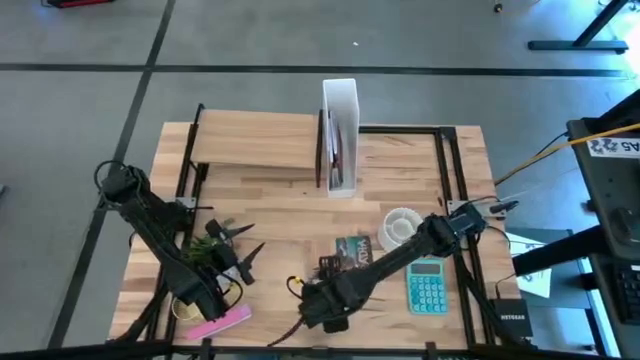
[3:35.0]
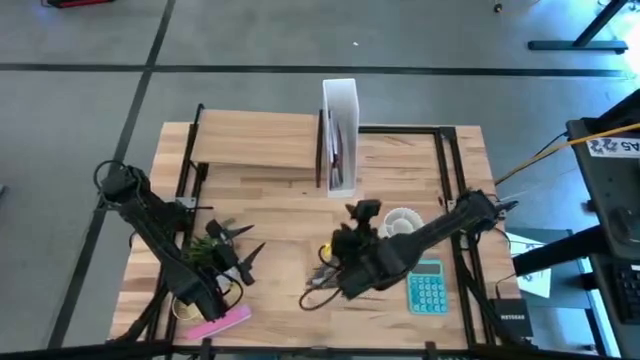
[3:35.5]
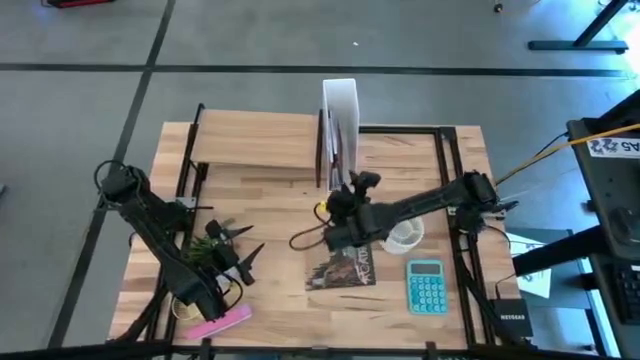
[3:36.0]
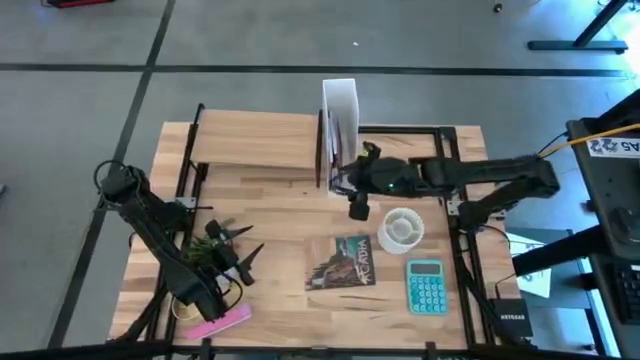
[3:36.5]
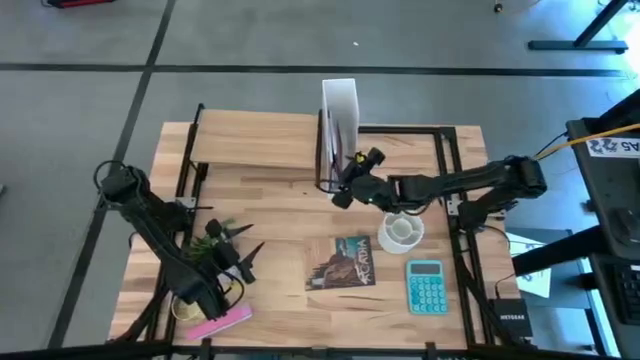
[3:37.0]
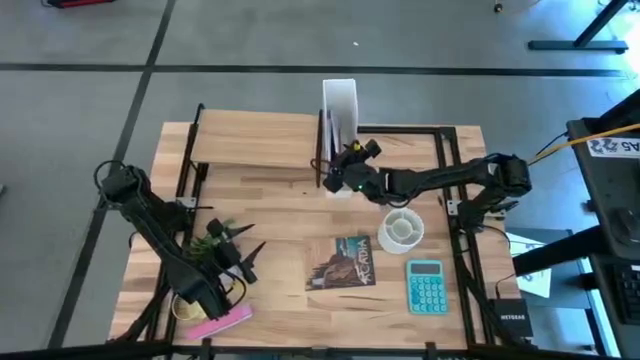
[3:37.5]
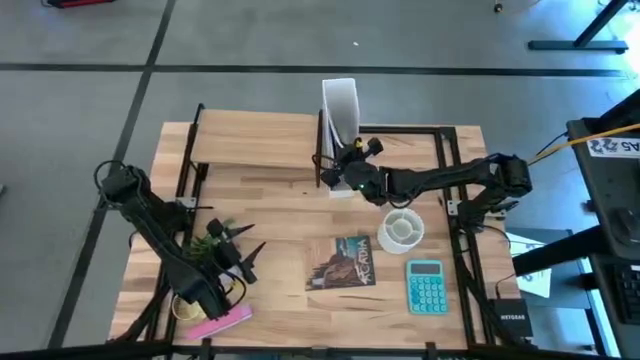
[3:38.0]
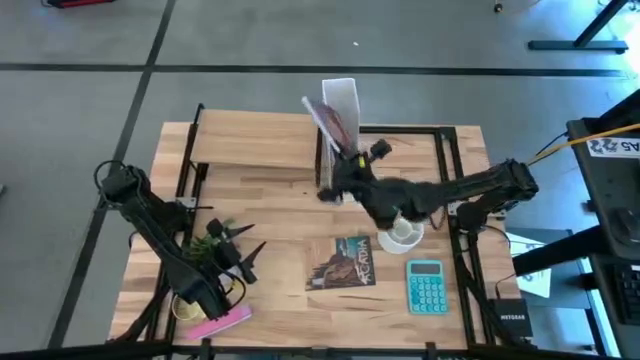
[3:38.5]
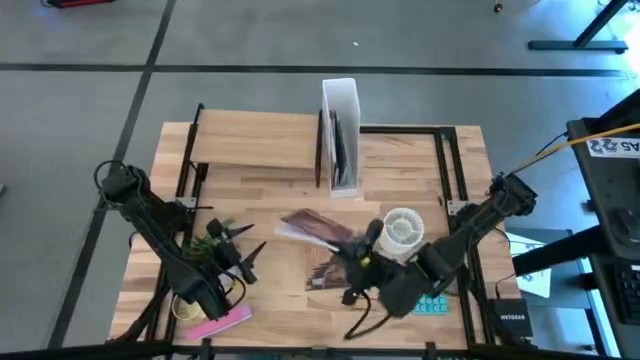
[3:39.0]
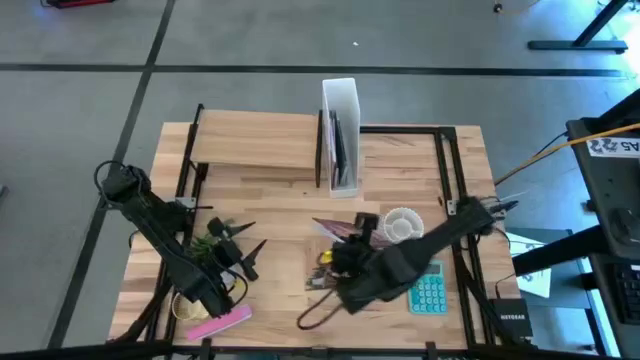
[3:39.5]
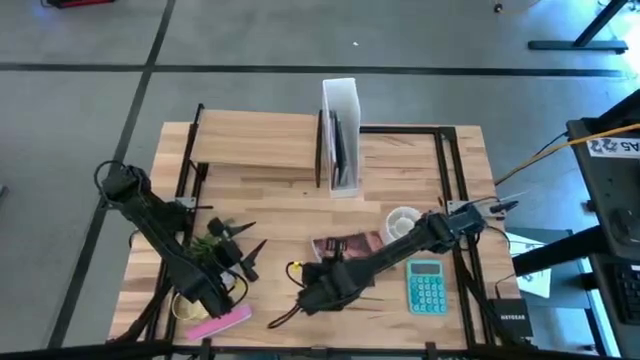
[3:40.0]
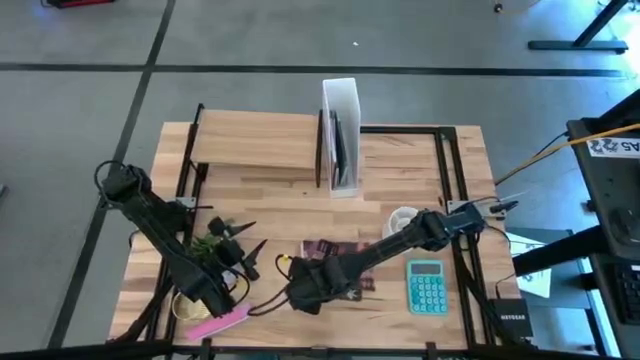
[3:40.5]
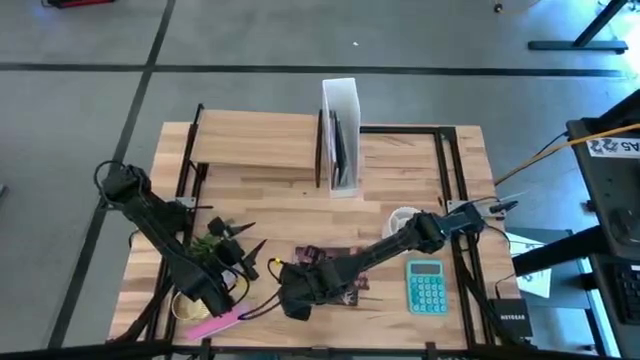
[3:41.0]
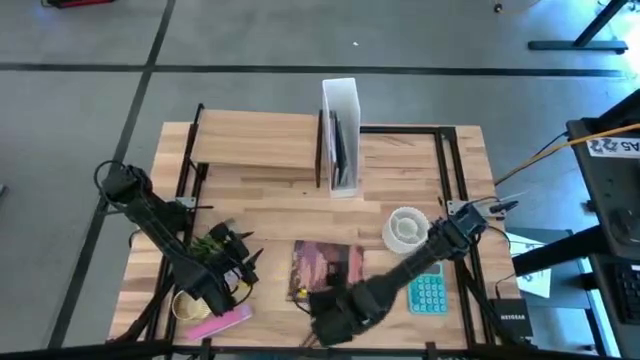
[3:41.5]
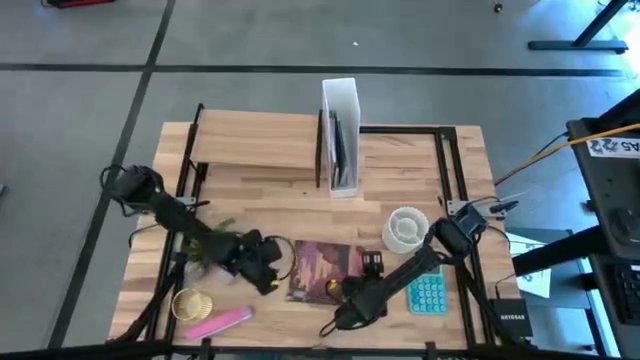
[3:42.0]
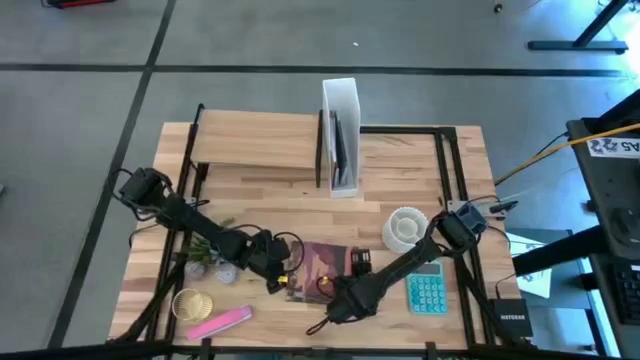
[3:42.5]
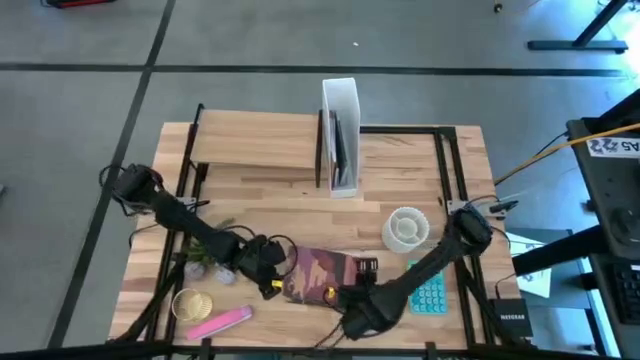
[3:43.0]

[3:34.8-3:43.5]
Task: Stock shelves
Remove the purple book from the white bookshelf

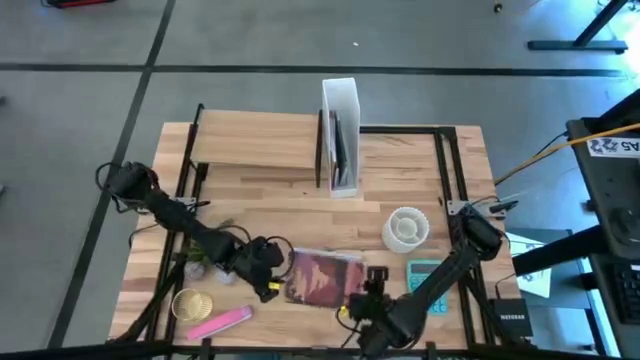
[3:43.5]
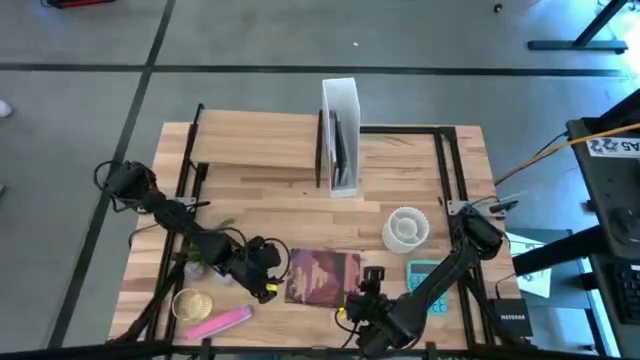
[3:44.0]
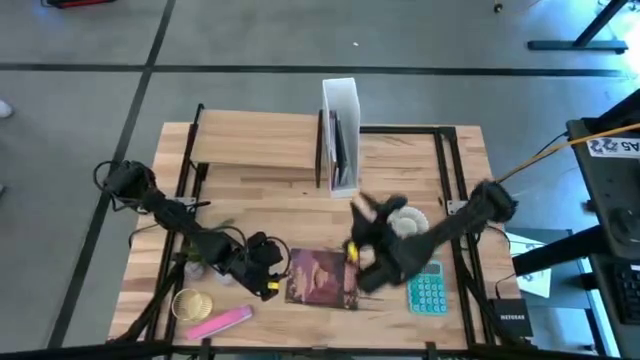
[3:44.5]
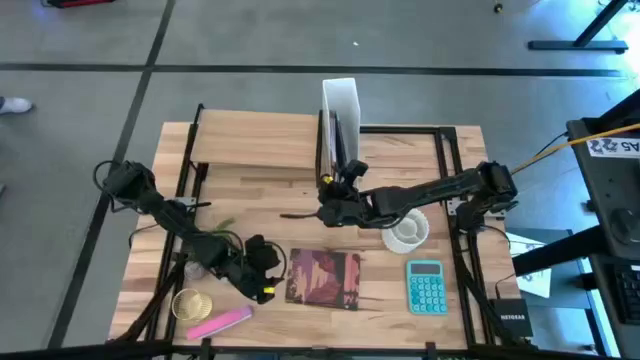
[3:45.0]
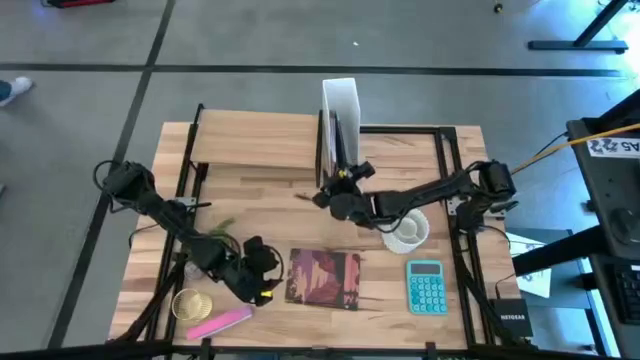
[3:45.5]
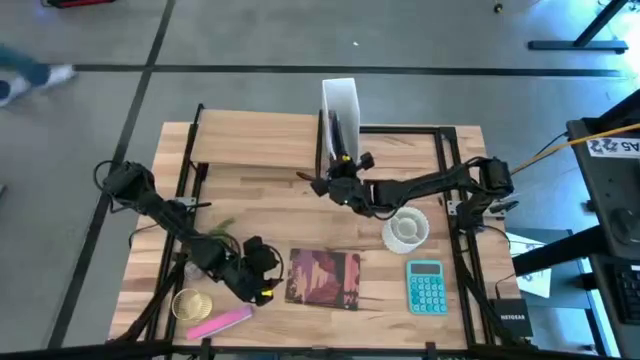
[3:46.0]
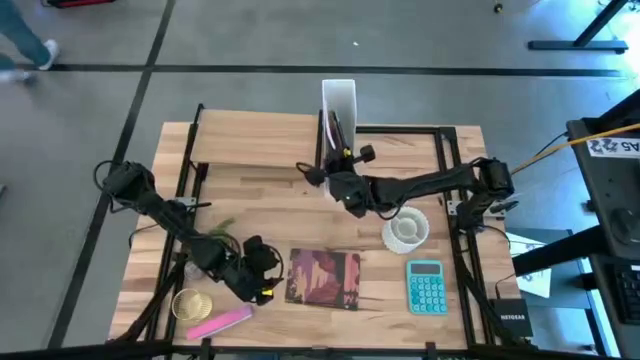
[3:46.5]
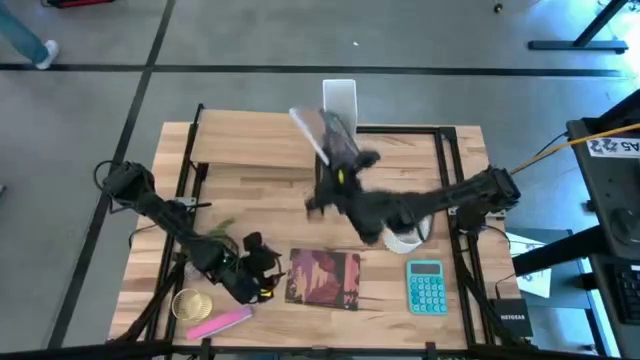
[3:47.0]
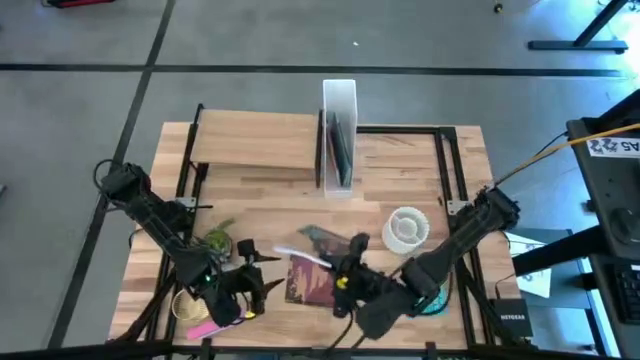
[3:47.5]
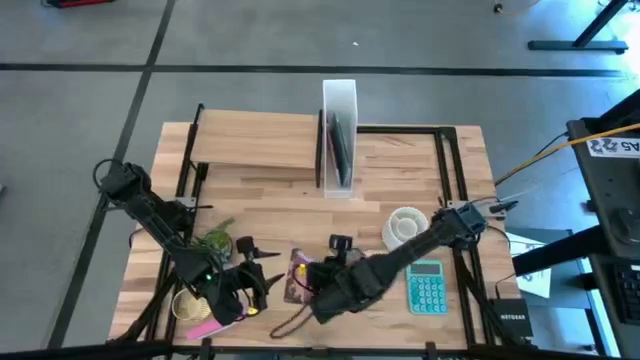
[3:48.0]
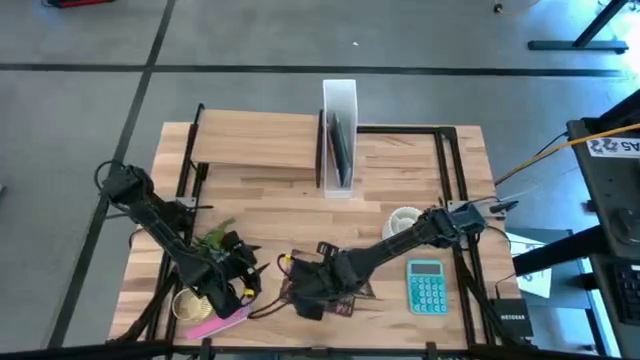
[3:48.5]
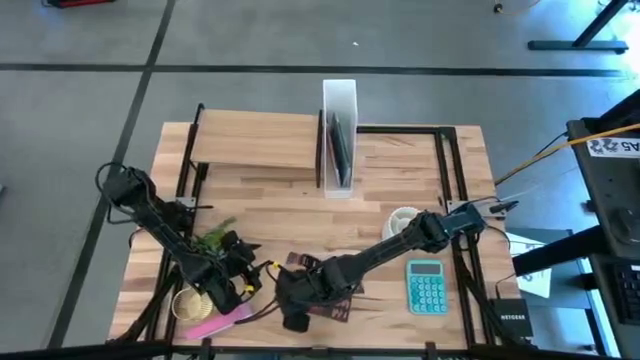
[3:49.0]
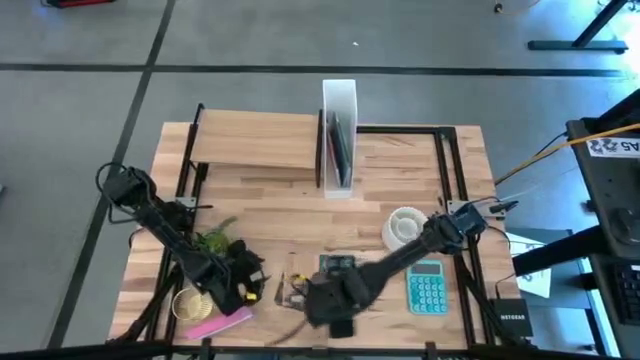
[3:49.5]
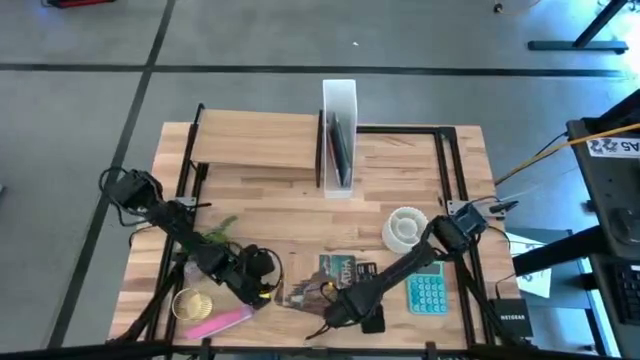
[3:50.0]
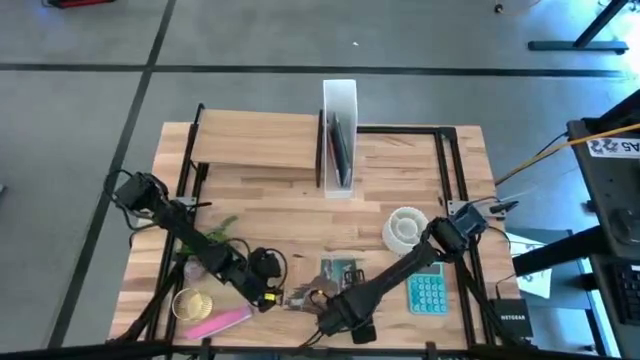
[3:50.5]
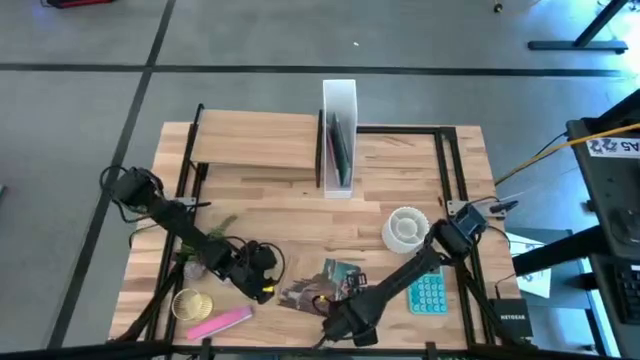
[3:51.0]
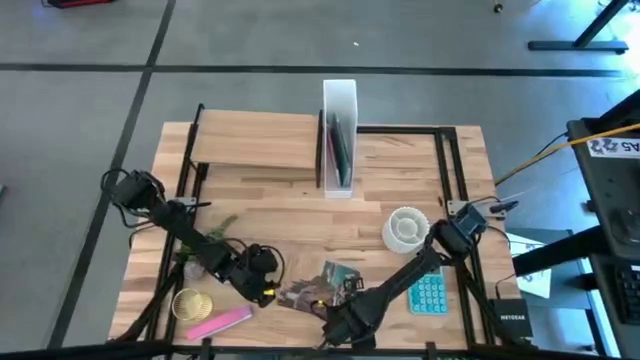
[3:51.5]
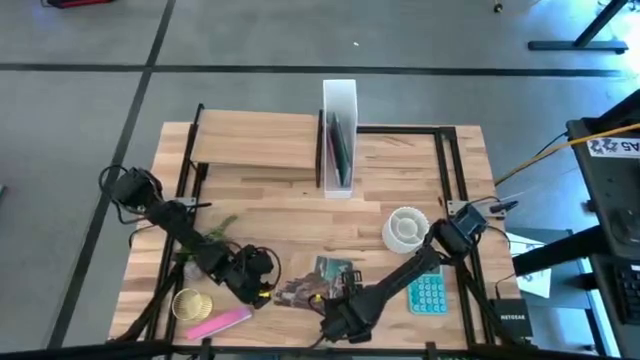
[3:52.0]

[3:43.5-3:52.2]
Remove the brown book from the white bookshelf

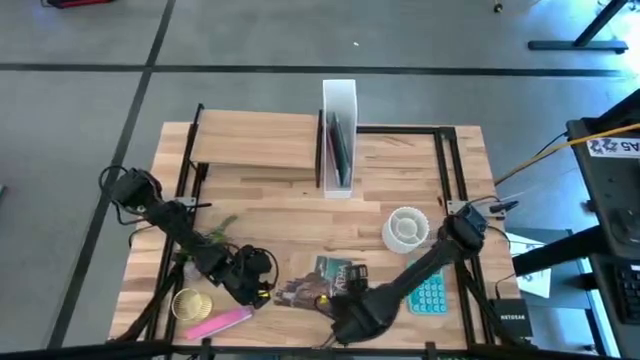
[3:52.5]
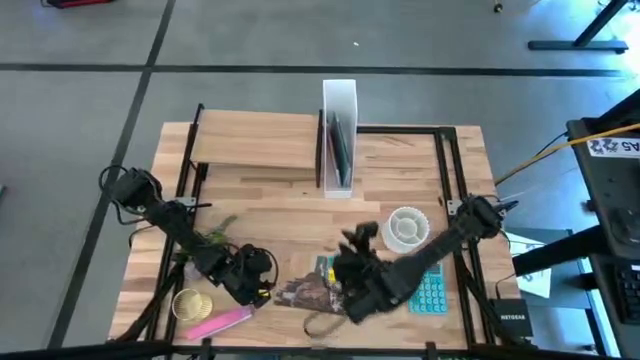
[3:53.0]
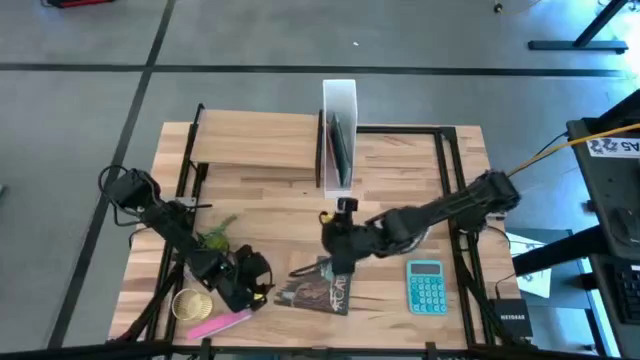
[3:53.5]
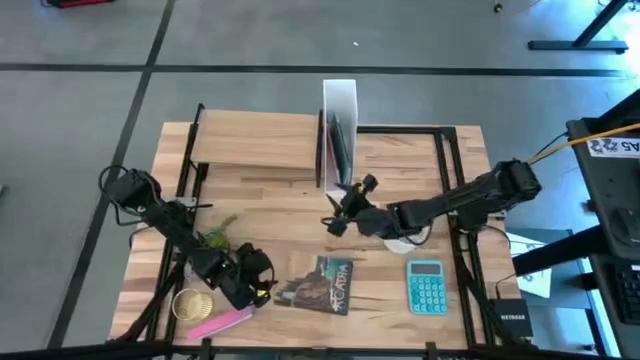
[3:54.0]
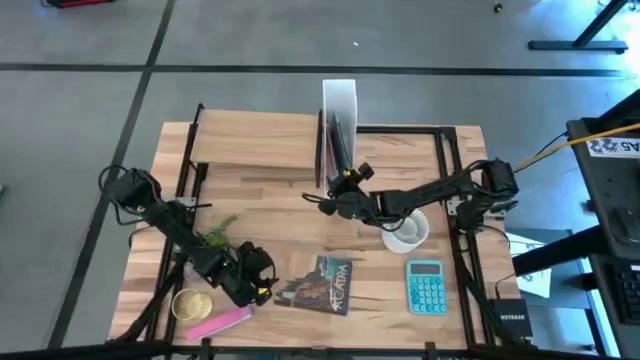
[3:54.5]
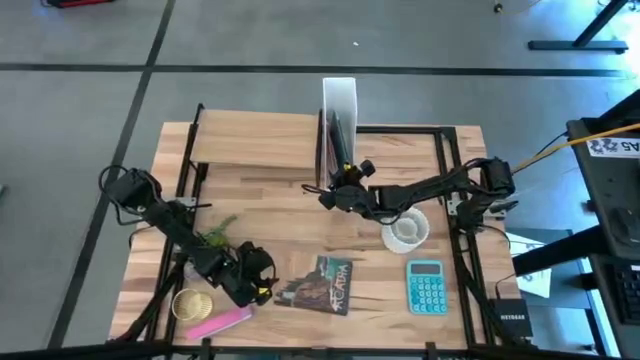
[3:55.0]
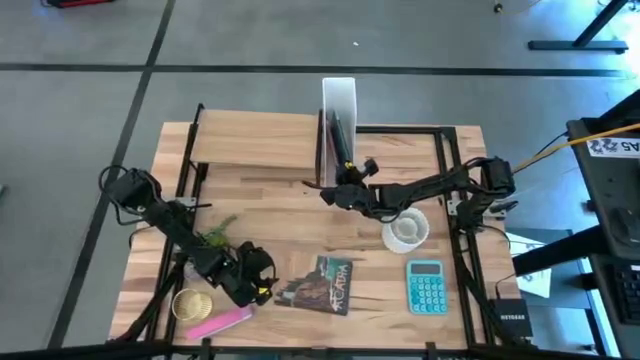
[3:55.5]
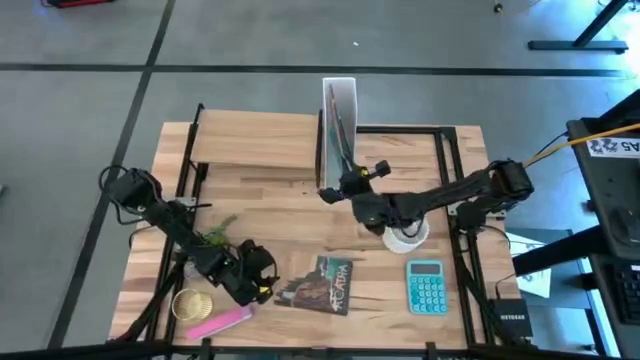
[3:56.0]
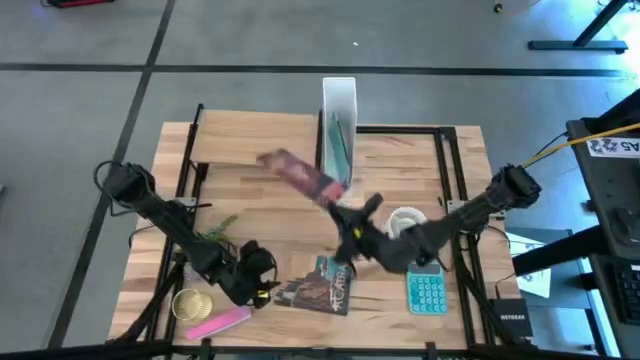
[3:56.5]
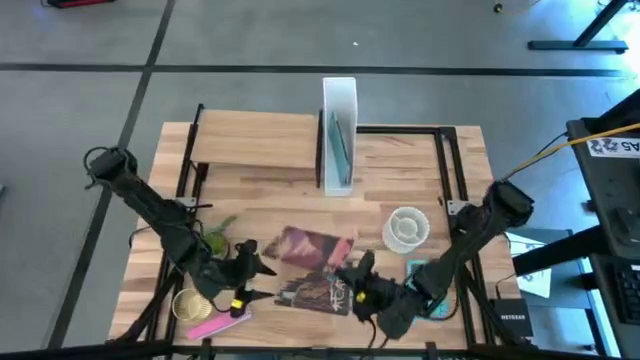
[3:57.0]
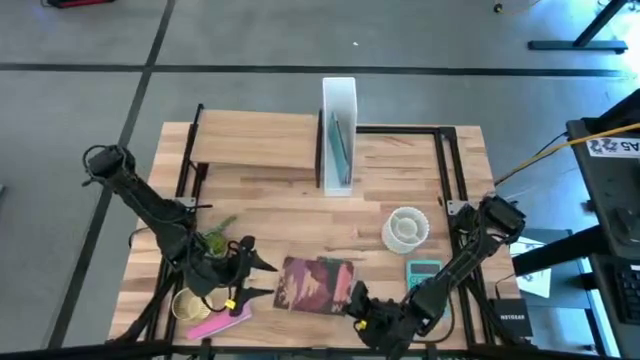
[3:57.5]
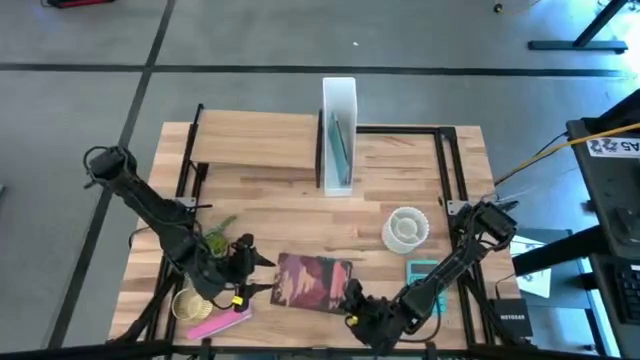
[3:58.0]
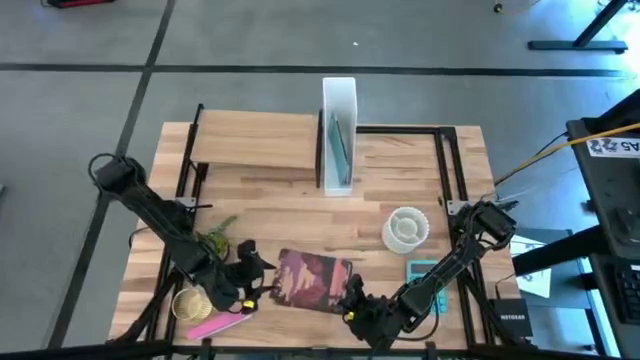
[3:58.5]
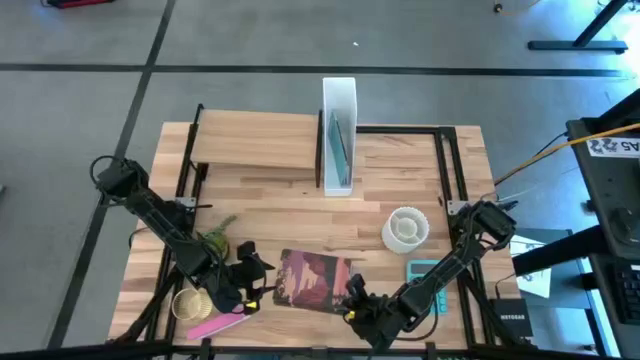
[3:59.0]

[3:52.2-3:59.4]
Remove the purple book from the white bookshelf
